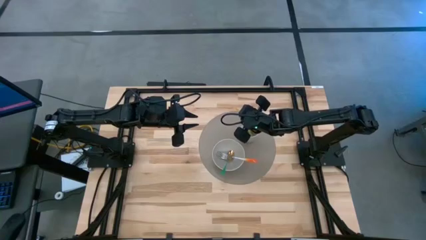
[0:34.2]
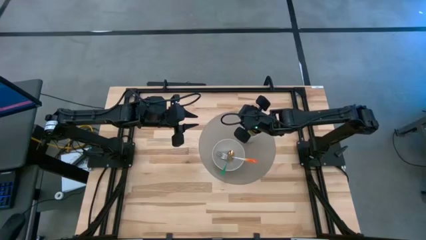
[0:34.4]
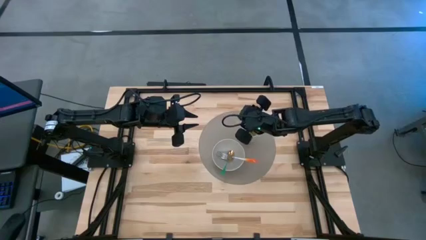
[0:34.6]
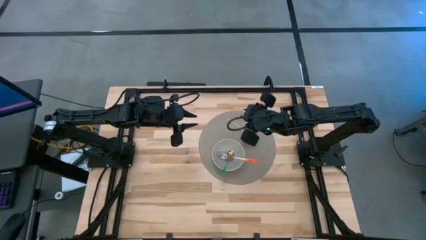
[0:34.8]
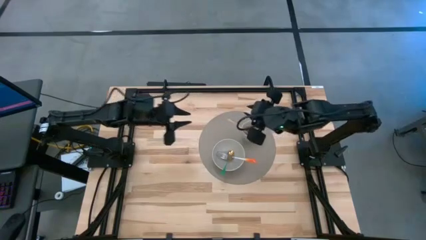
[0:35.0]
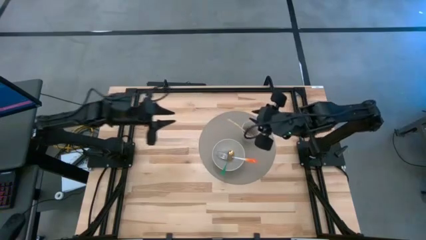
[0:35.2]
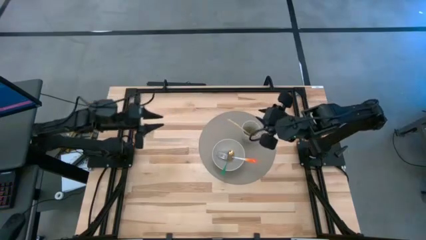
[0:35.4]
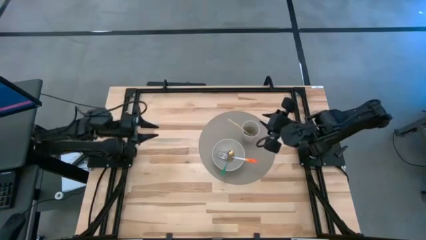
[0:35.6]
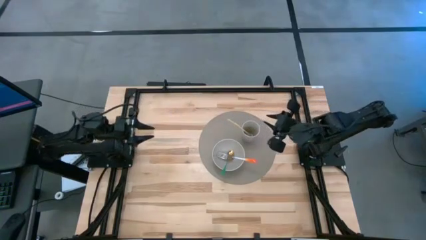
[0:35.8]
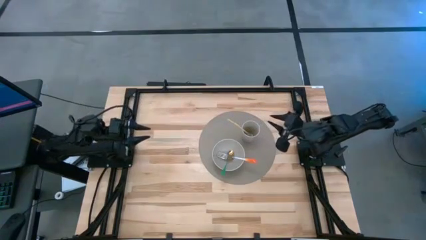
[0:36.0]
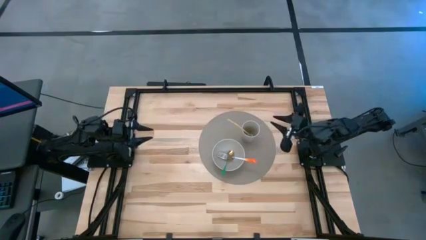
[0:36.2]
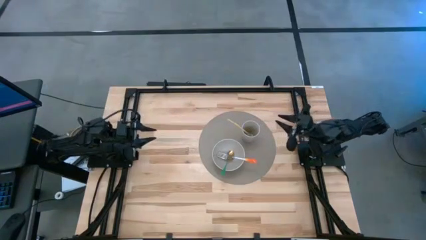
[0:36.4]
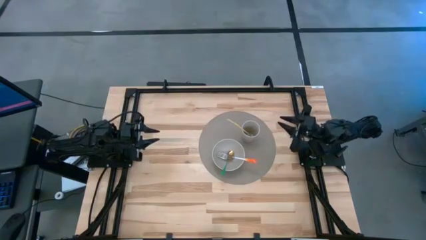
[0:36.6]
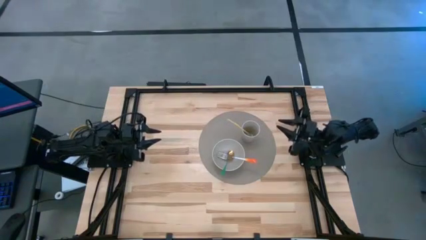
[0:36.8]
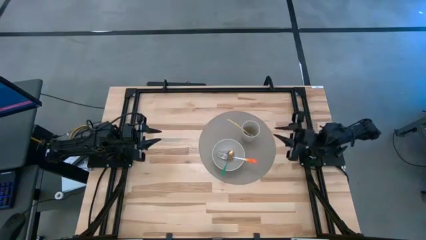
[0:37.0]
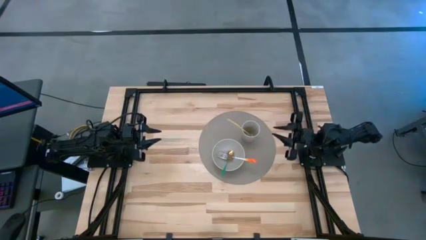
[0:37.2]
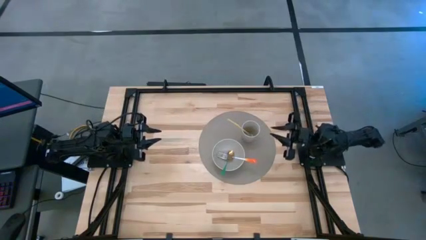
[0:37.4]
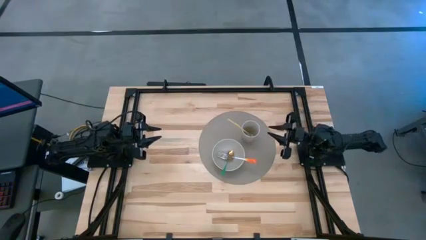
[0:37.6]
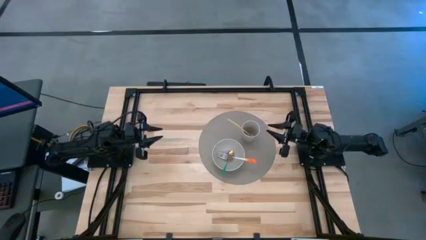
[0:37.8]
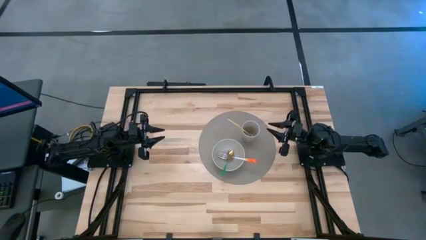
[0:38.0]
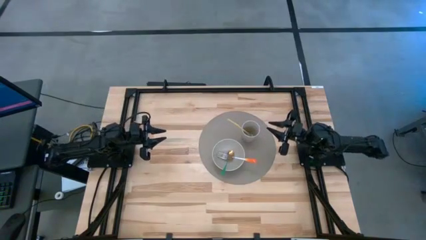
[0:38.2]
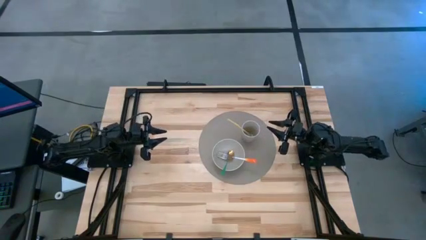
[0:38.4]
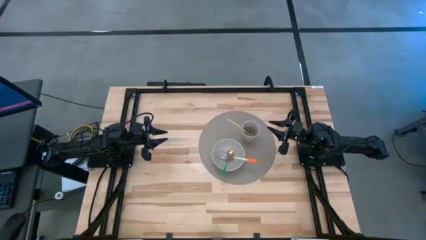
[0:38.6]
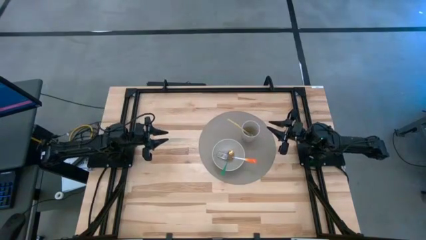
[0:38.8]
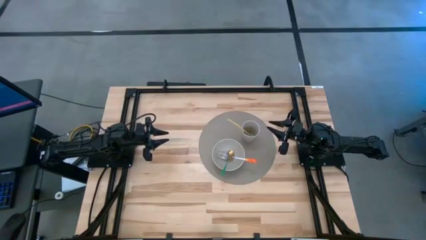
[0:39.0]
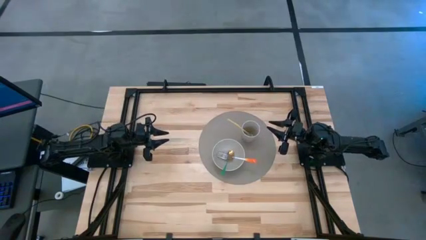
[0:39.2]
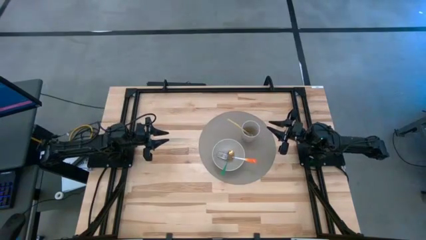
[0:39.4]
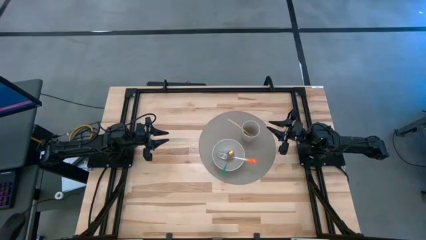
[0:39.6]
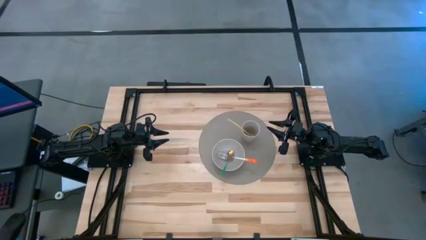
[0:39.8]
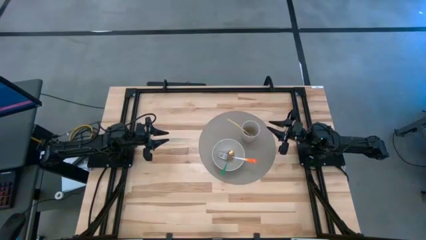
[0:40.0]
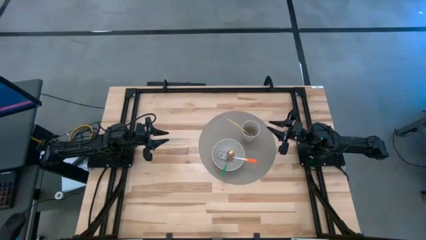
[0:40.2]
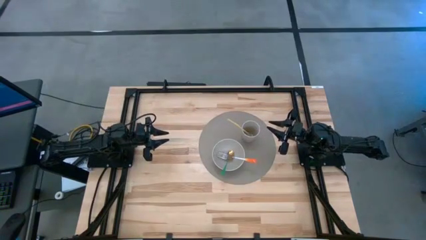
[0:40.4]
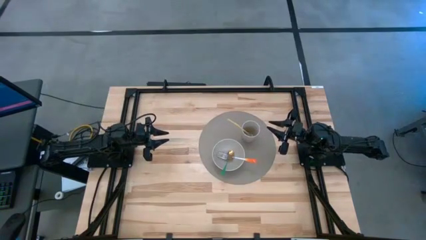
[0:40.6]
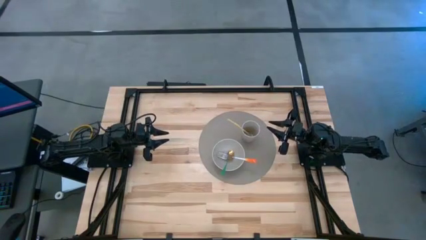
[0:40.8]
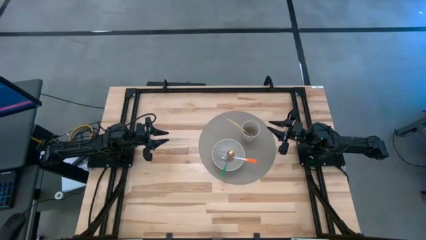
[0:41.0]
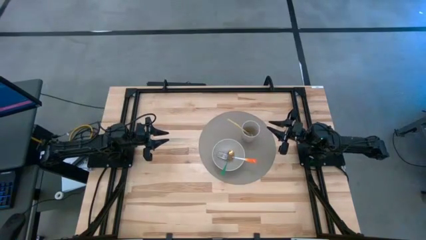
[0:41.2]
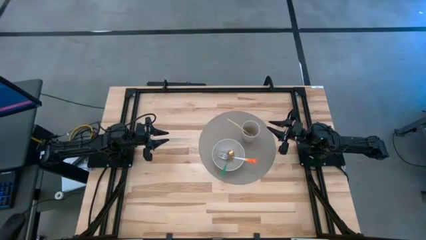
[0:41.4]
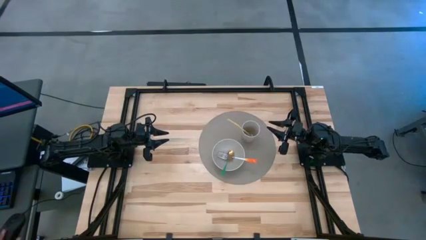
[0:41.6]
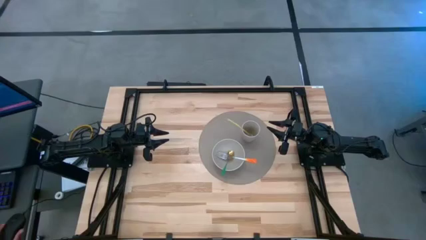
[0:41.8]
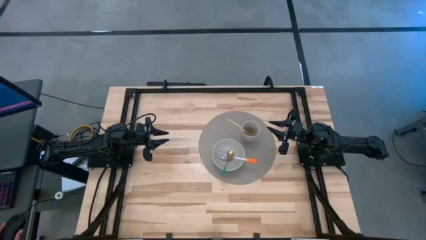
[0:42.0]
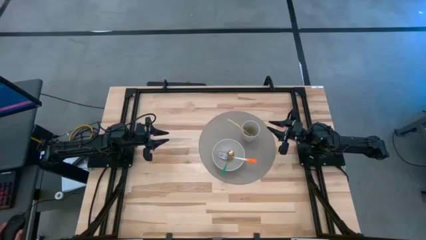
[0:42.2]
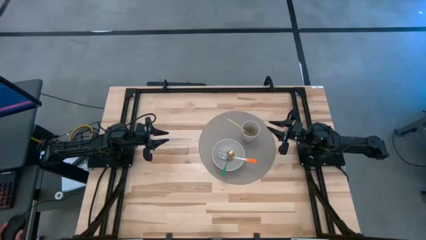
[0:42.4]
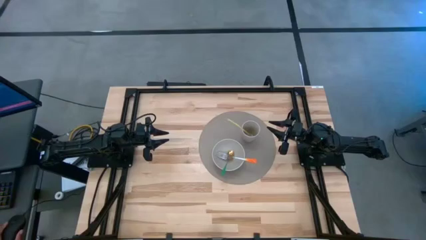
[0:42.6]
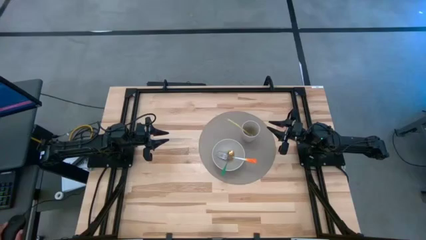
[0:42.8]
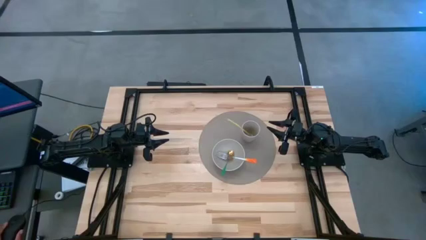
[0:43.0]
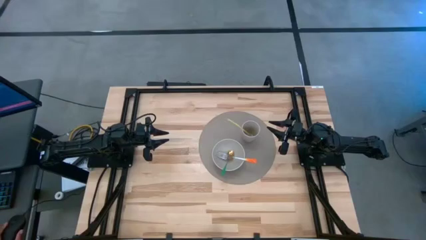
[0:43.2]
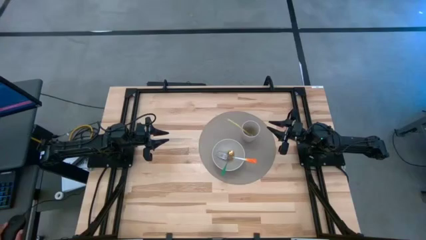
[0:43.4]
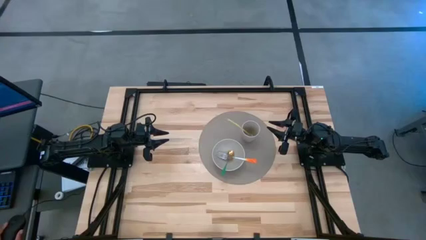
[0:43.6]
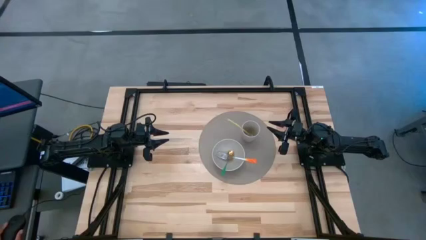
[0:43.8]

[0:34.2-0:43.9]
Task: Pick & Place Utensil
Return to Home Position

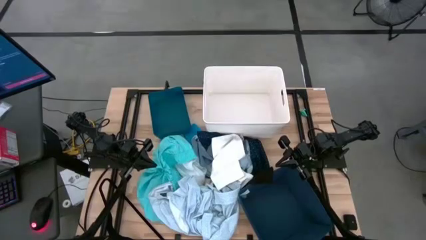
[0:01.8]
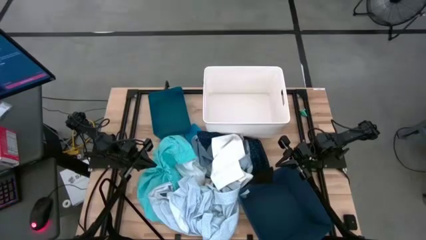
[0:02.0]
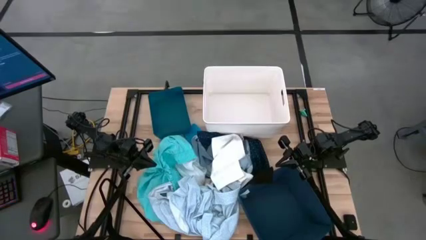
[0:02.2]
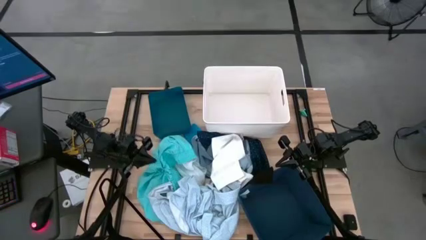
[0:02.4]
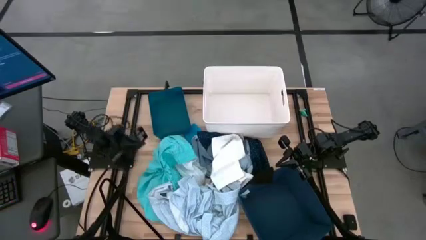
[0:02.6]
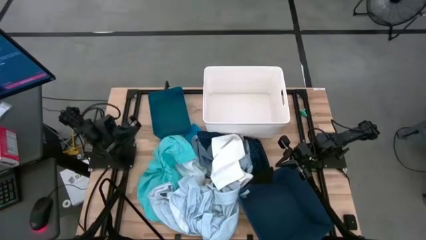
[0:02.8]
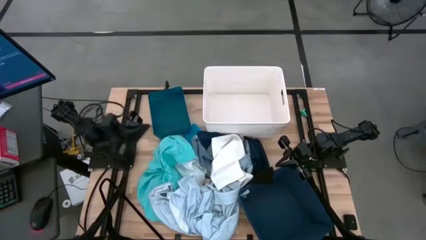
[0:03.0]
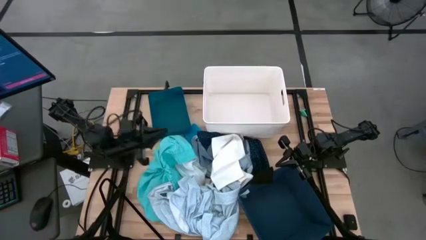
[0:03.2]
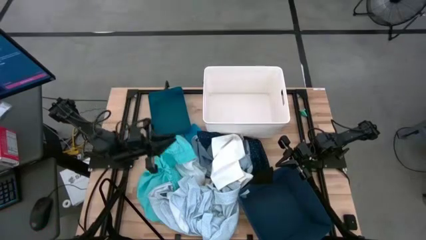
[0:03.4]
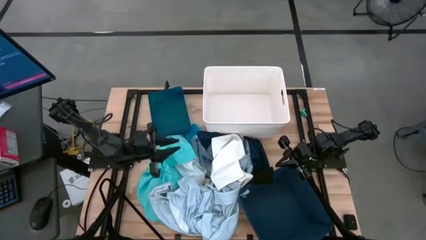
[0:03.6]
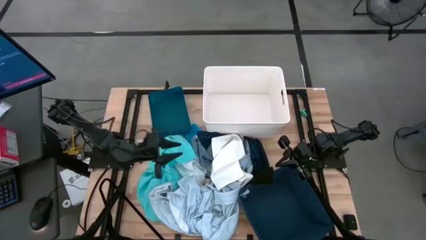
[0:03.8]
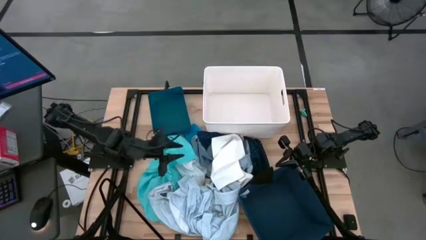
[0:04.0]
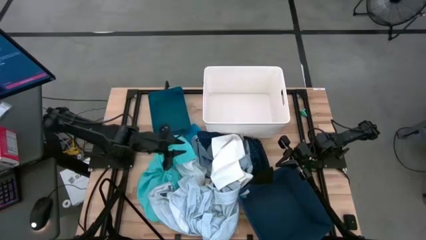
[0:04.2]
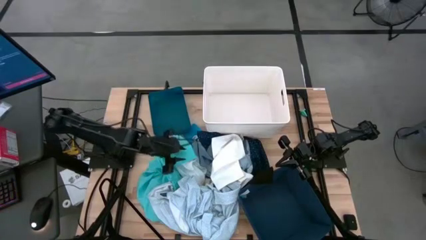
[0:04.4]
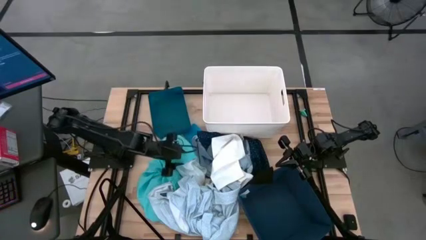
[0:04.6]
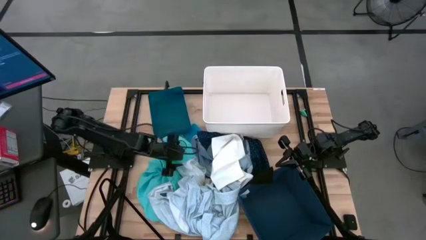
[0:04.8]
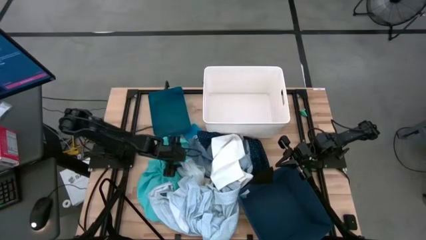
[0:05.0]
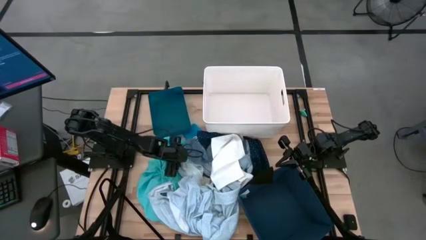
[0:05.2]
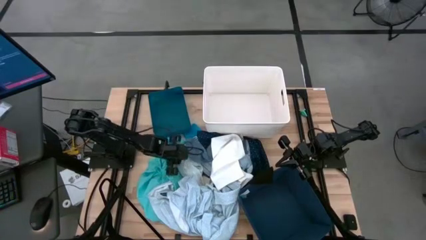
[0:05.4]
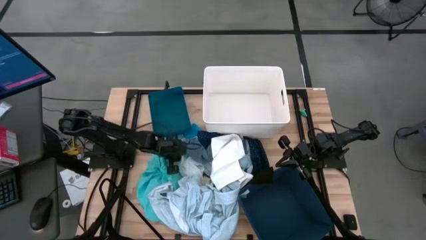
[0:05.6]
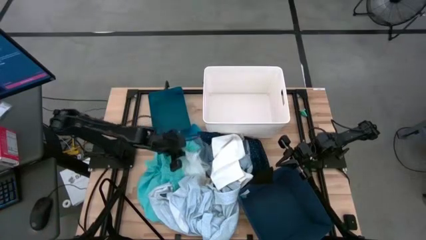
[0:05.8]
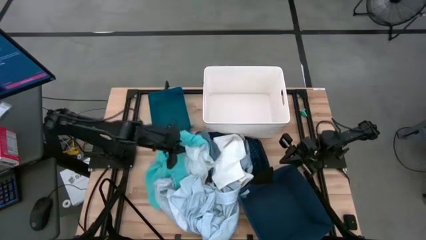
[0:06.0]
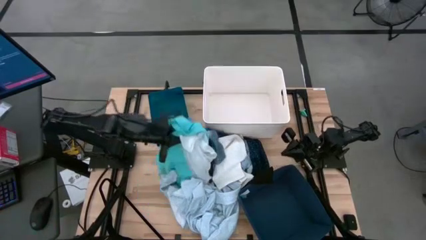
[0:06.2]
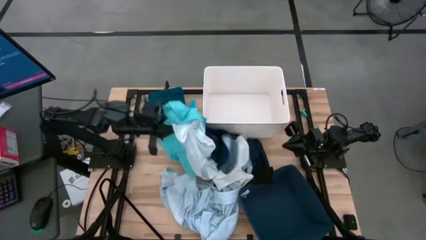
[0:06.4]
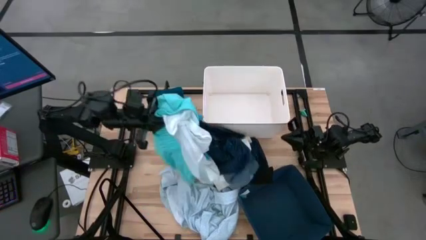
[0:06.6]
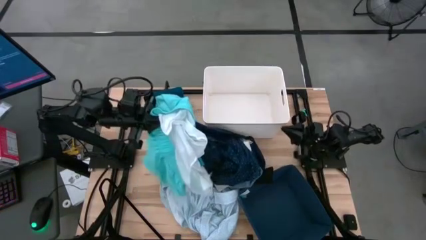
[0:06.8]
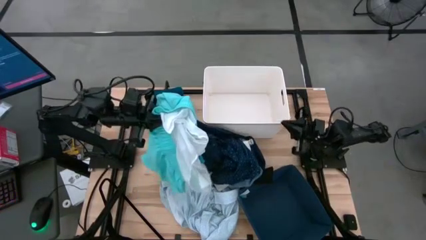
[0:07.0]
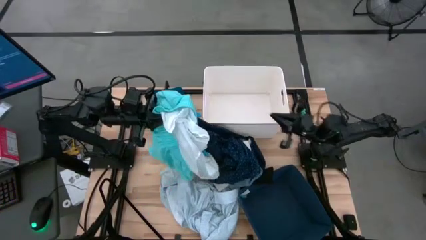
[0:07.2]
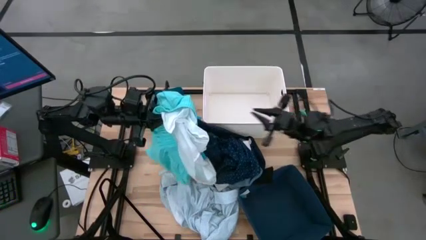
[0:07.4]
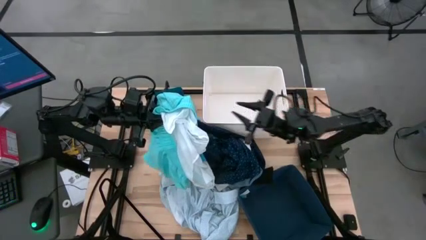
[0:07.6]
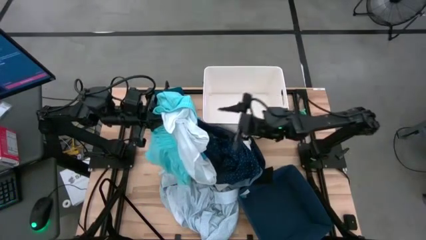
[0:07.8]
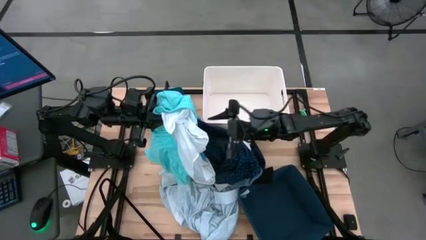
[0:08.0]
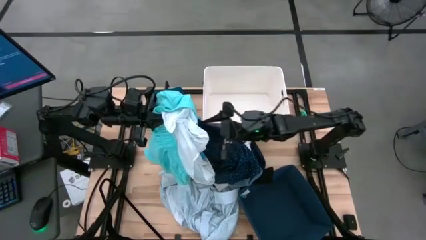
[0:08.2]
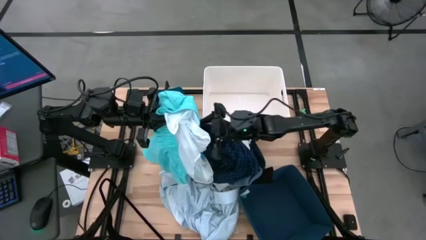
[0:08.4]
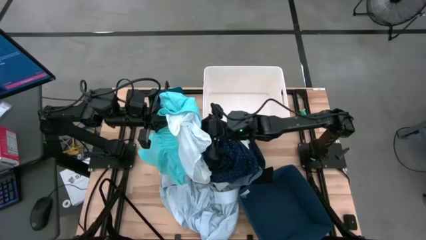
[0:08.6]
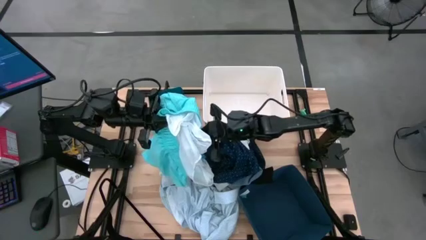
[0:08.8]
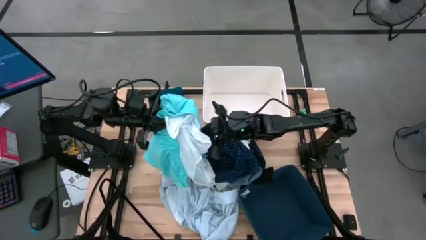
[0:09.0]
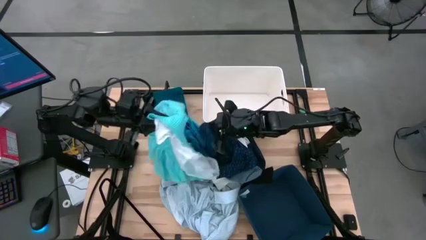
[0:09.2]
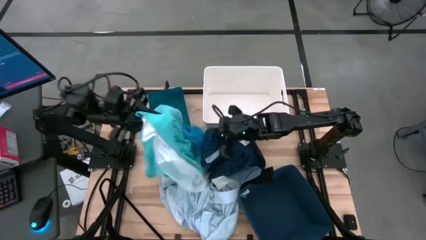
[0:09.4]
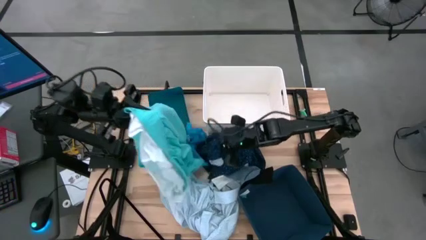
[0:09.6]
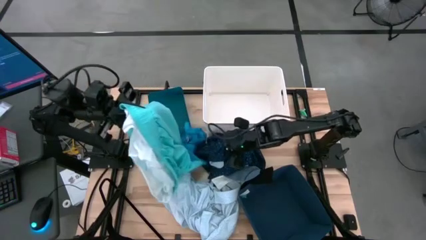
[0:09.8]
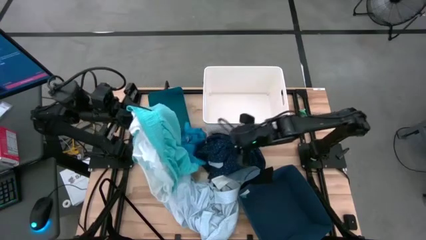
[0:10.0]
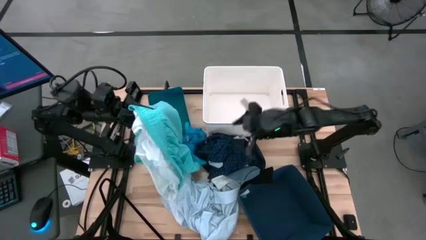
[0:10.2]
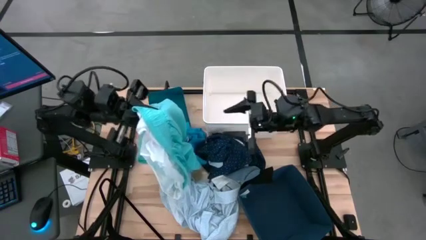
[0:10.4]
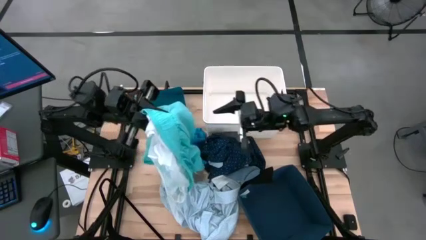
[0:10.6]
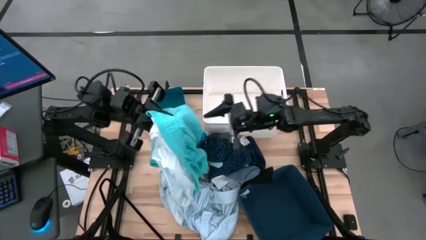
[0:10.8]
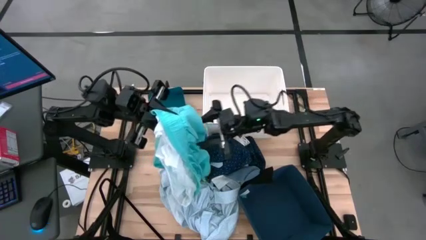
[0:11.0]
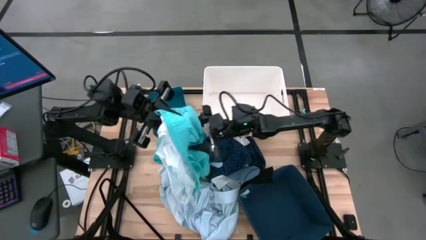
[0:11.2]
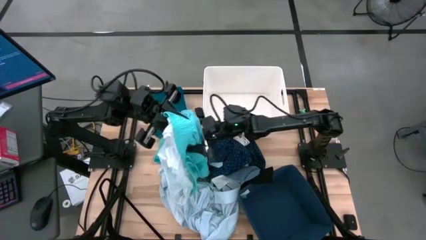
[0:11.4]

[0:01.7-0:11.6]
Task: Pick & Place Cloths
Put the light blue shorts into the dark blue bin
